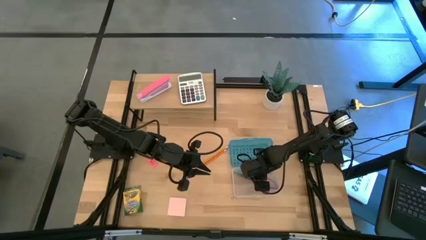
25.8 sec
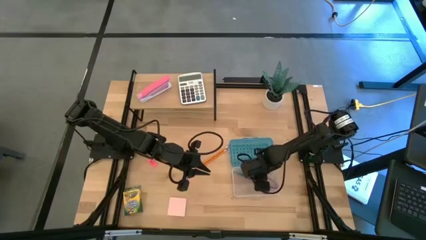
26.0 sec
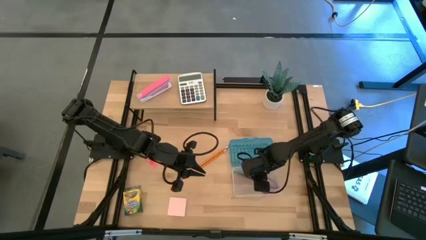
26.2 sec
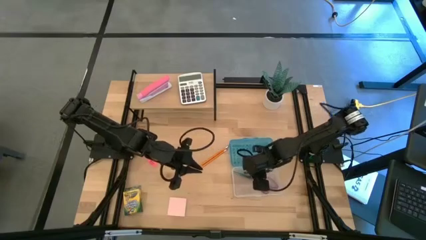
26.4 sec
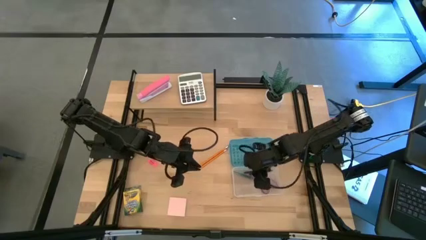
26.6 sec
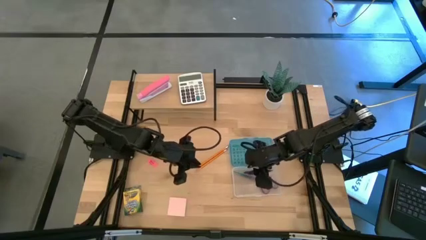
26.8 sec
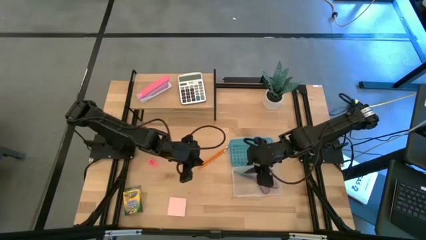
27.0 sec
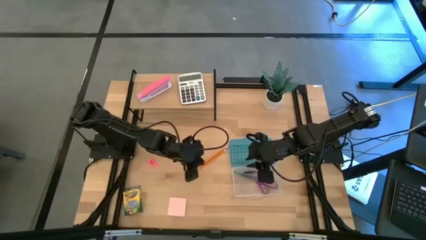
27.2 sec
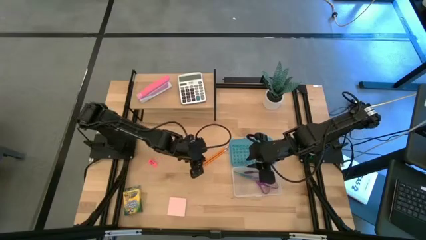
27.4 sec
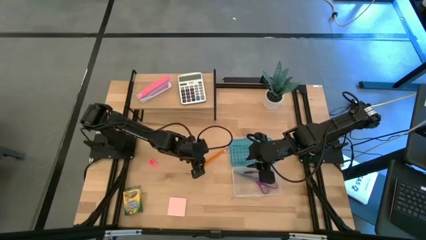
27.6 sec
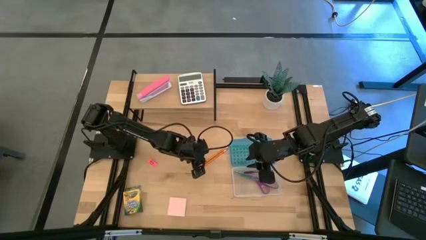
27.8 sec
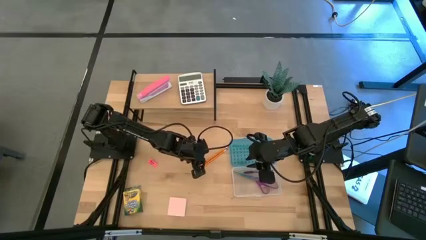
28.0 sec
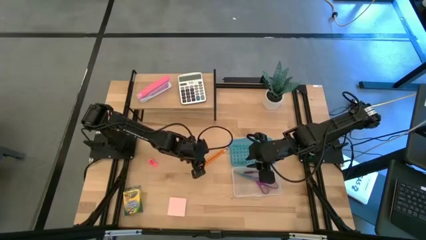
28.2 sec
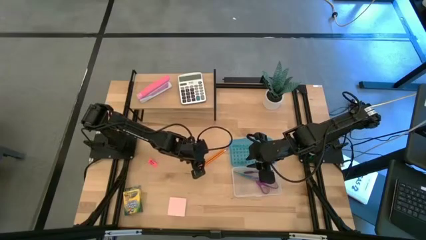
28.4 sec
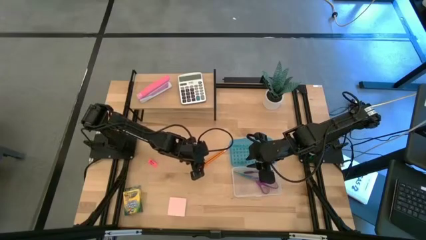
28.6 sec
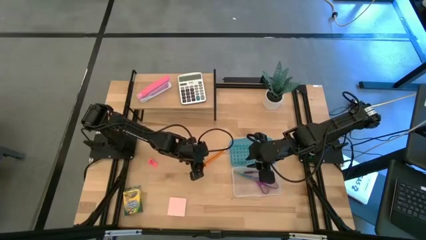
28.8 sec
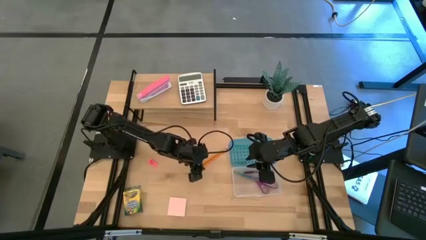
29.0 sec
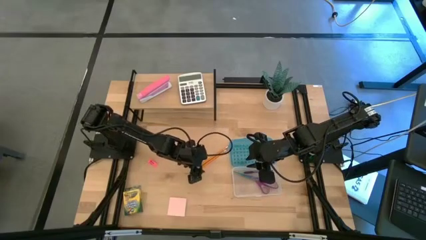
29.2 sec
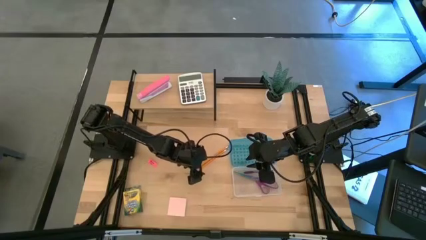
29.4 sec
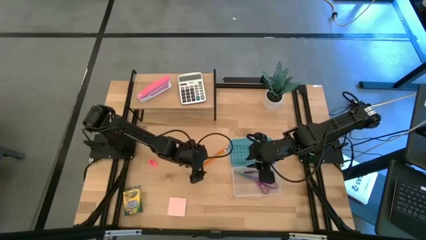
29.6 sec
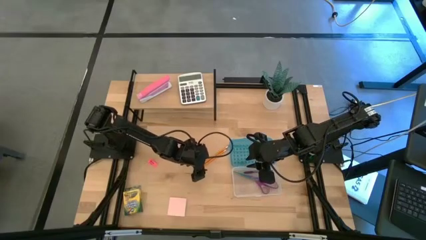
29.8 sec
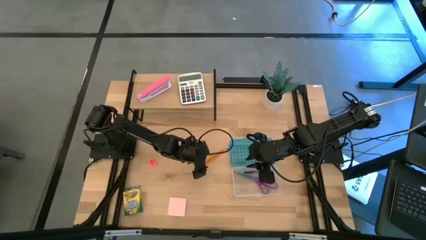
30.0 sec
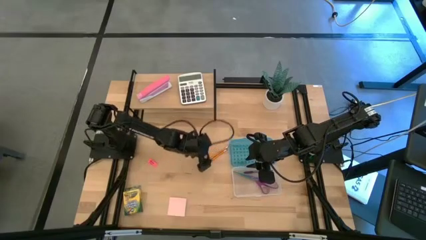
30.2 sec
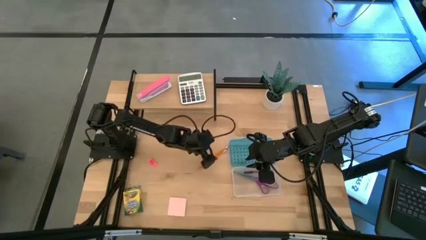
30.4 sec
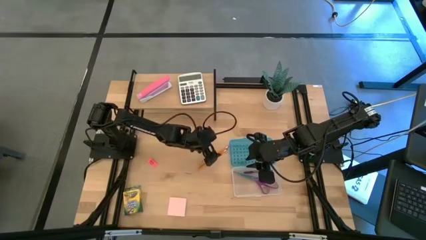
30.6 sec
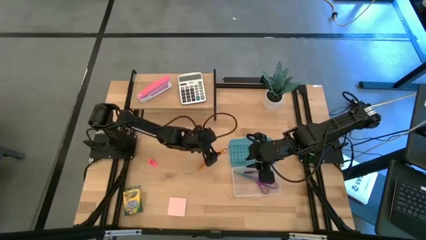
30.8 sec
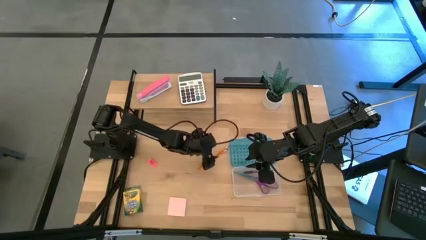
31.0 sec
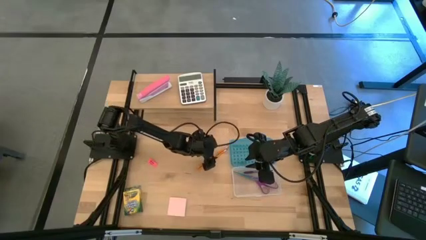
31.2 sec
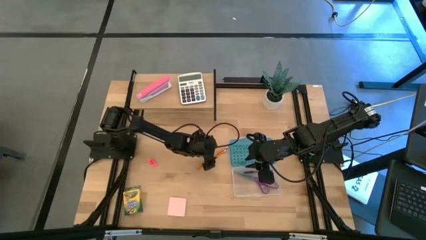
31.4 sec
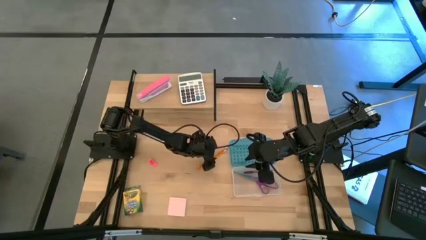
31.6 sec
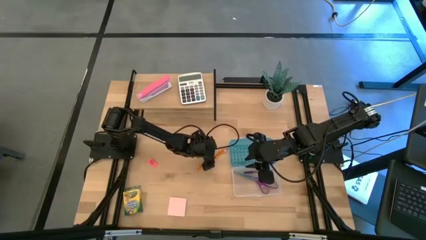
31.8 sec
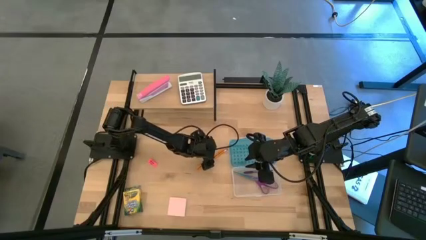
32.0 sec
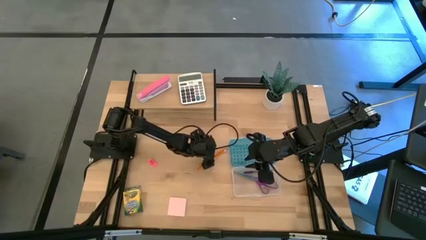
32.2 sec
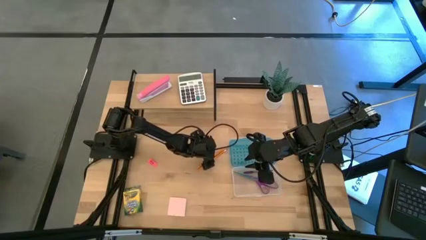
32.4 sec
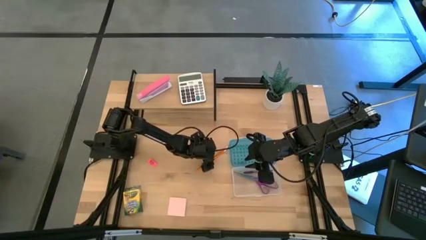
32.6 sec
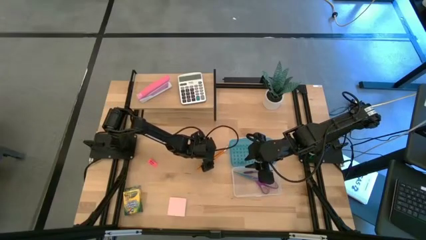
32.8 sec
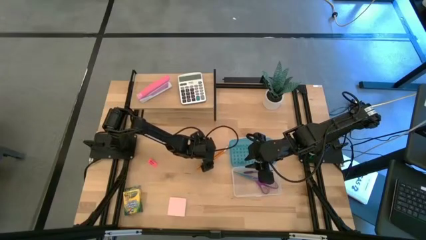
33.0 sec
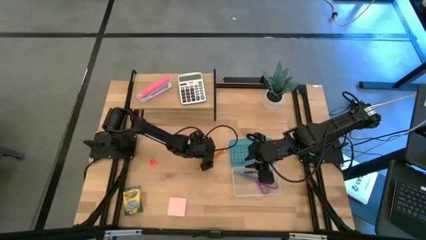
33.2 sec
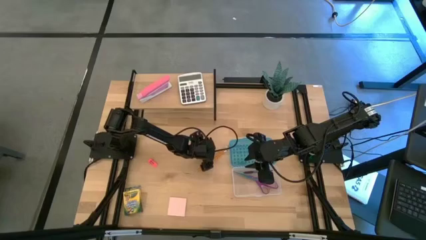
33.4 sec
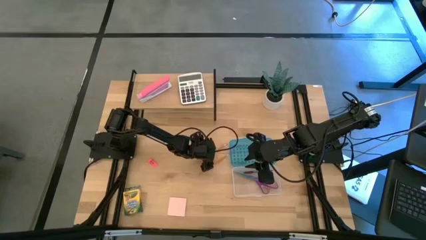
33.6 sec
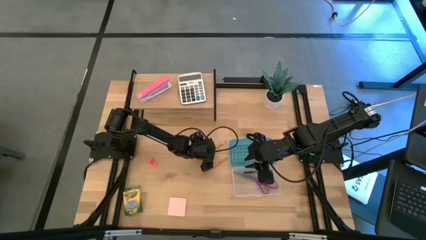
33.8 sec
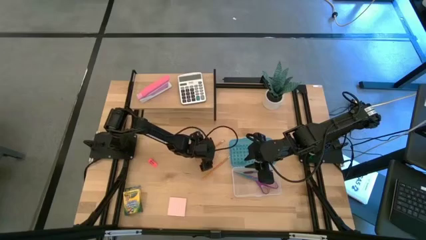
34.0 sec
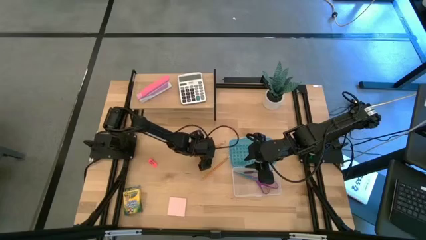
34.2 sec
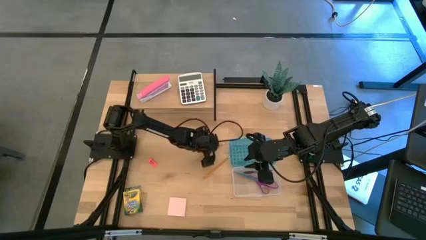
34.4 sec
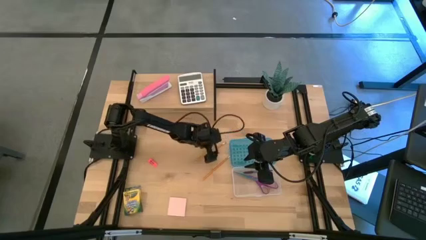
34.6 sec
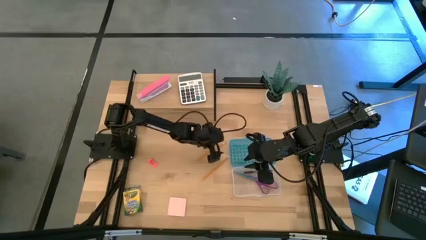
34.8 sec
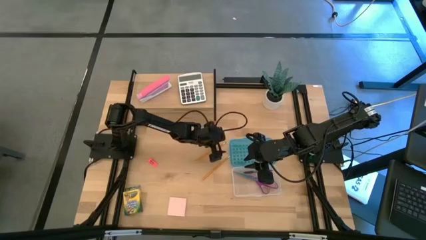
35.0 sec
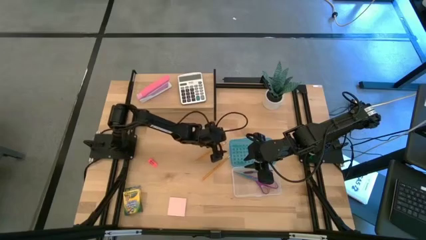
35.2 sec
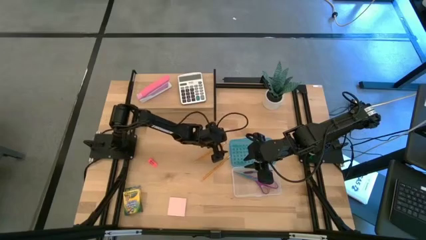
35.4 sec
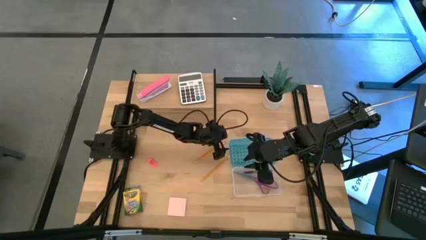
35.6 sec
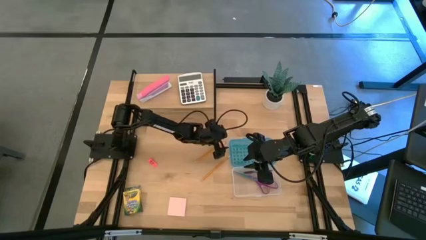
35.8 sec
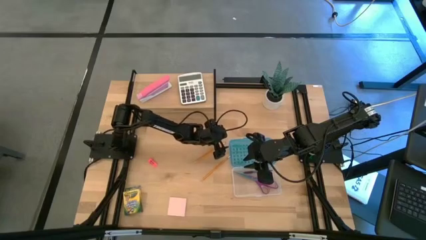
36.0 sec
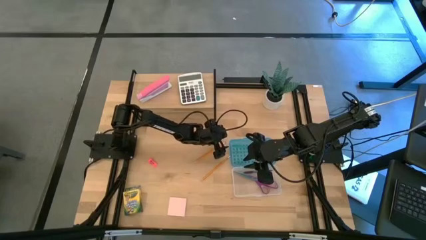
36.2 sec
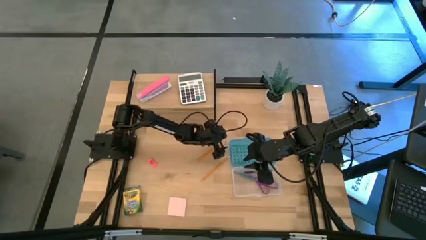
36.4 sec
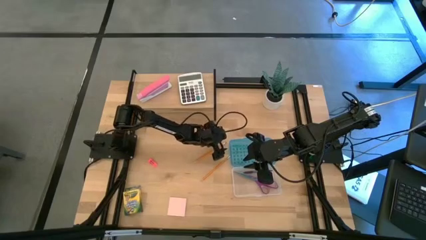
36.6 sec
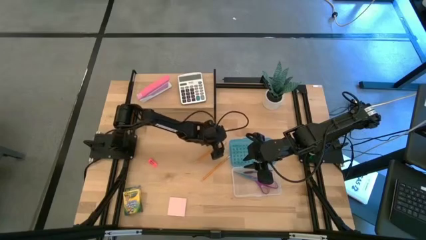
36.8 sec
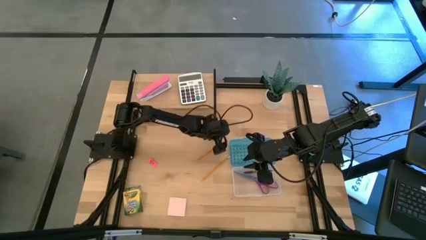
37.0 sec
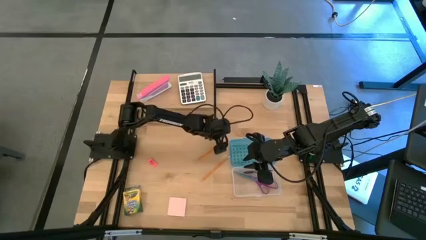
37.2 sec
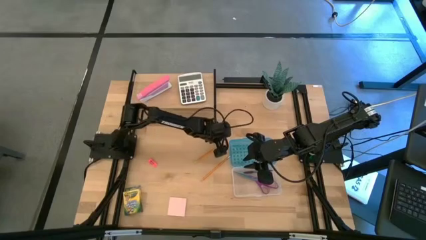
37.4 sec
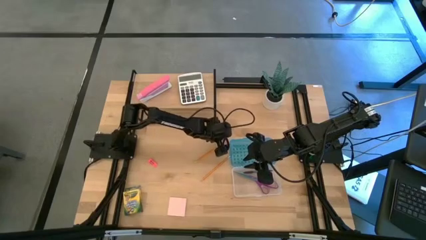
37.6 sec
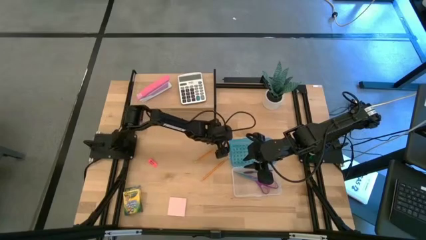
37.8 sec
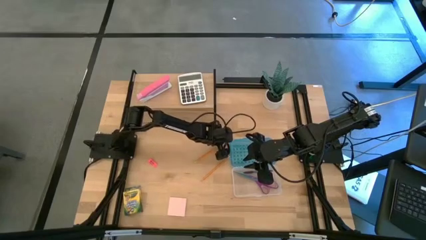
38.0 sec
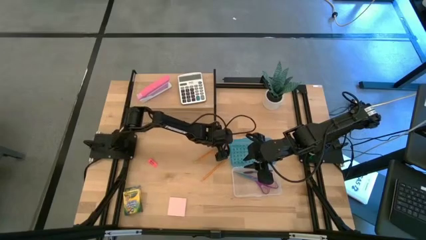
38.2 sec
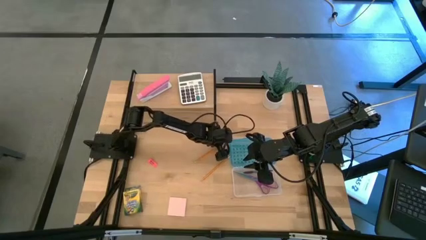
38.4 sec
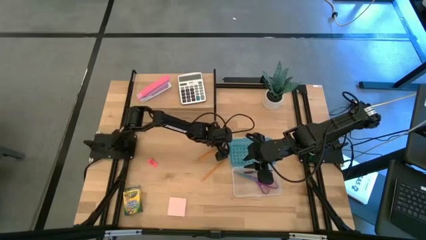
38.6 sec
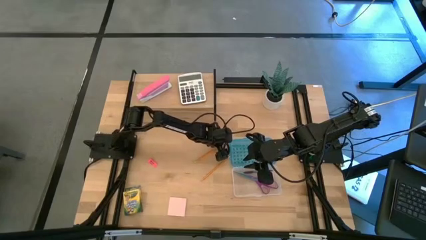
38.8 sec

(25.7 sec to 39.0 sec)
Task: Pack school essentials
Put the top orange pencil into the blue supply box
